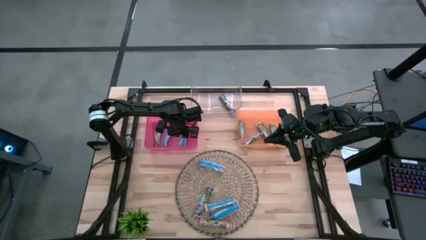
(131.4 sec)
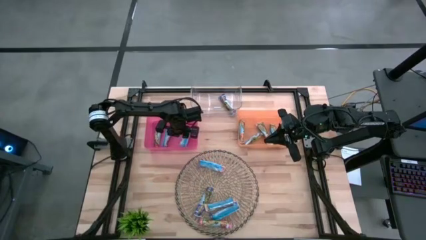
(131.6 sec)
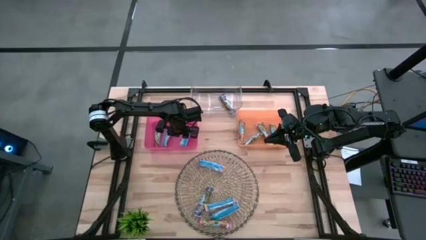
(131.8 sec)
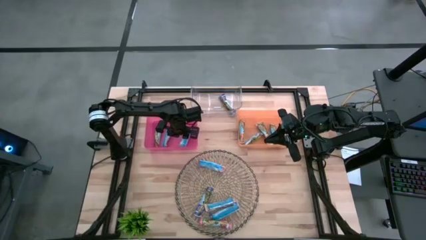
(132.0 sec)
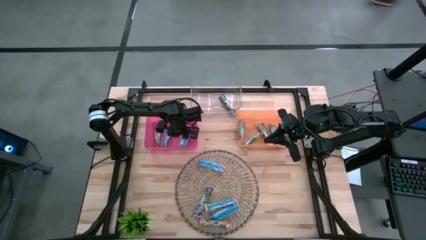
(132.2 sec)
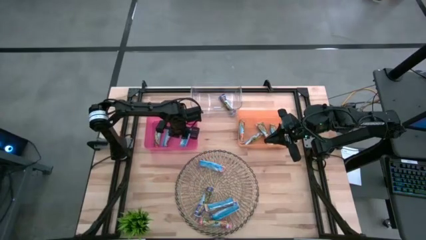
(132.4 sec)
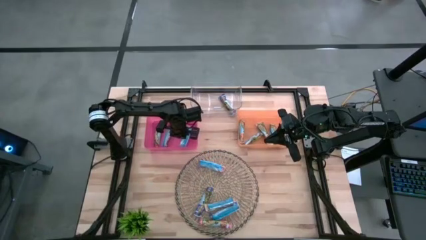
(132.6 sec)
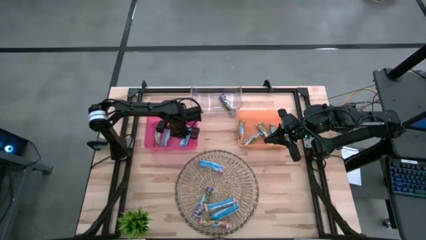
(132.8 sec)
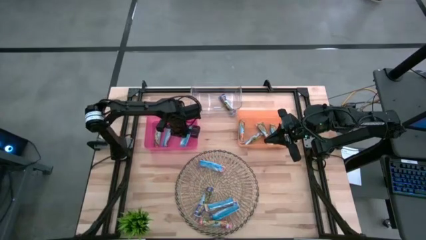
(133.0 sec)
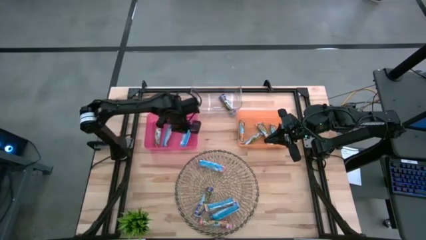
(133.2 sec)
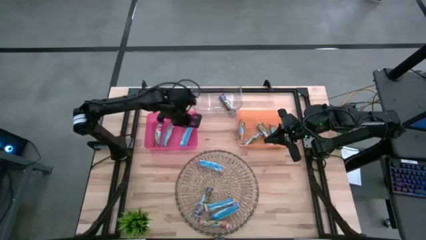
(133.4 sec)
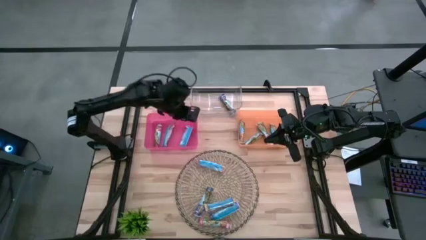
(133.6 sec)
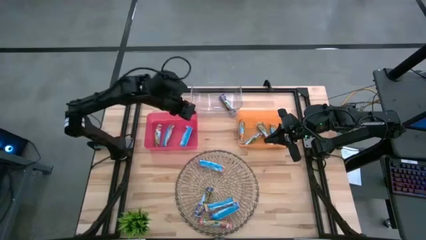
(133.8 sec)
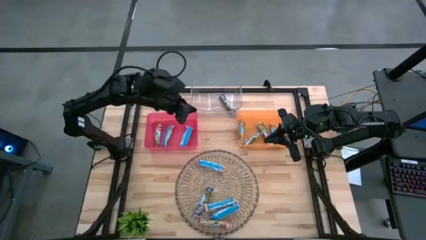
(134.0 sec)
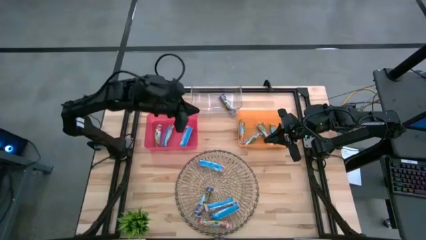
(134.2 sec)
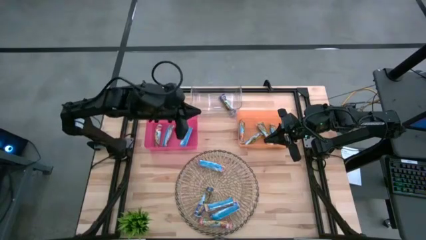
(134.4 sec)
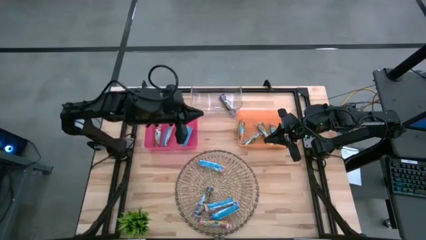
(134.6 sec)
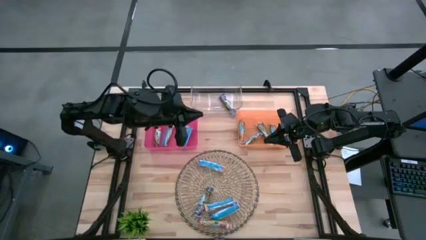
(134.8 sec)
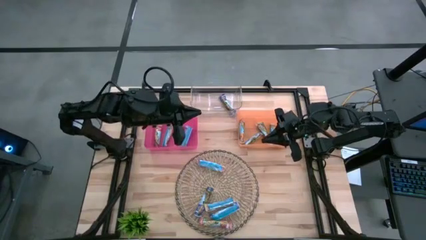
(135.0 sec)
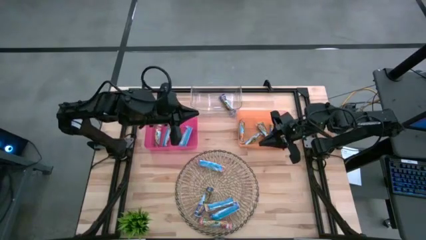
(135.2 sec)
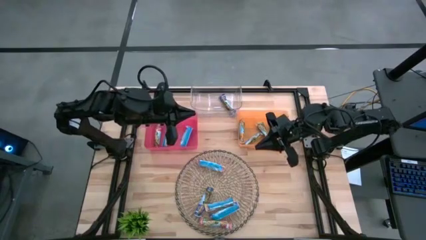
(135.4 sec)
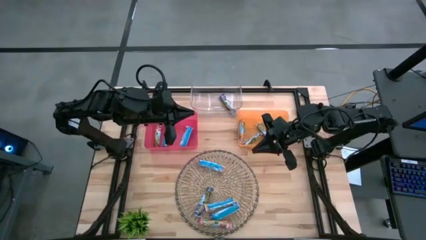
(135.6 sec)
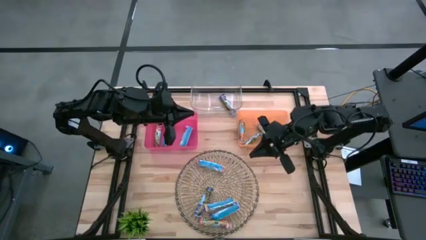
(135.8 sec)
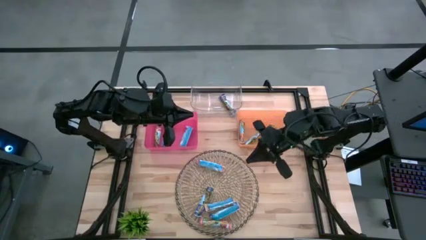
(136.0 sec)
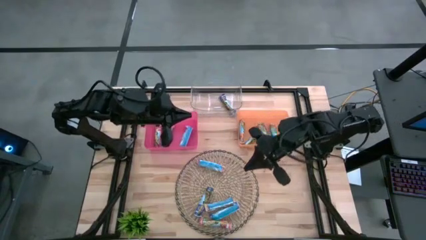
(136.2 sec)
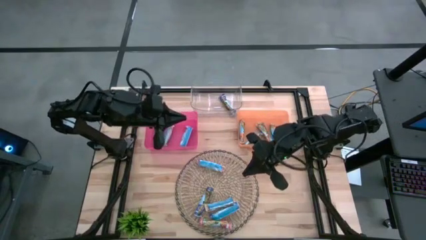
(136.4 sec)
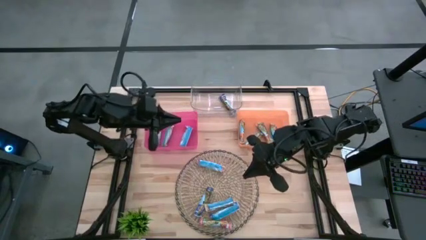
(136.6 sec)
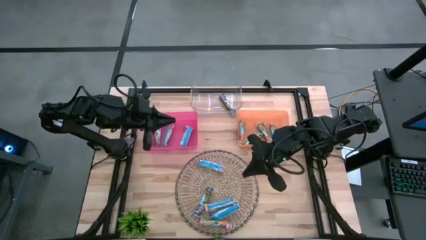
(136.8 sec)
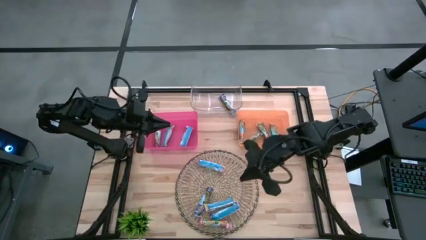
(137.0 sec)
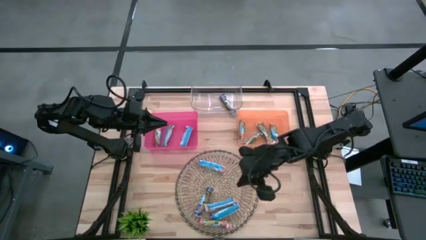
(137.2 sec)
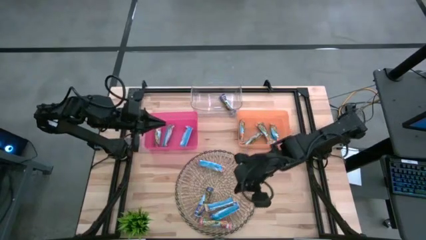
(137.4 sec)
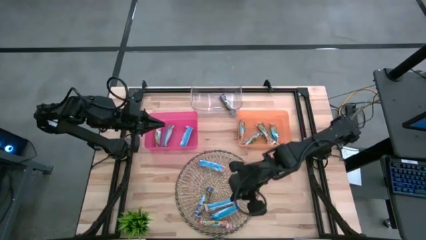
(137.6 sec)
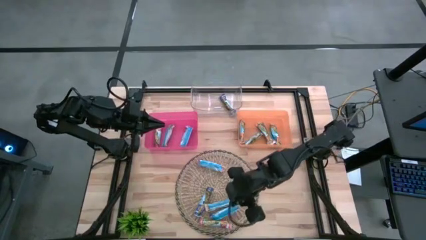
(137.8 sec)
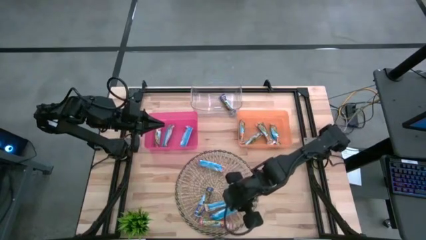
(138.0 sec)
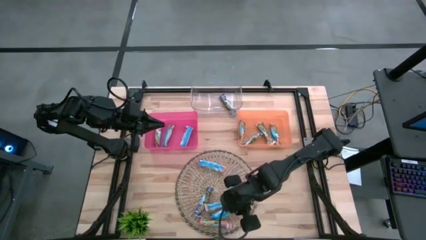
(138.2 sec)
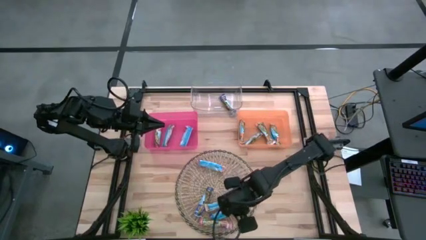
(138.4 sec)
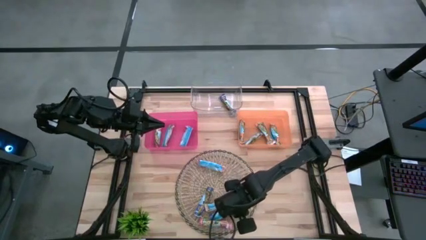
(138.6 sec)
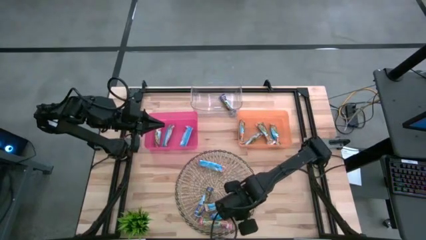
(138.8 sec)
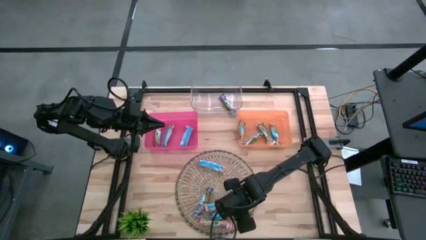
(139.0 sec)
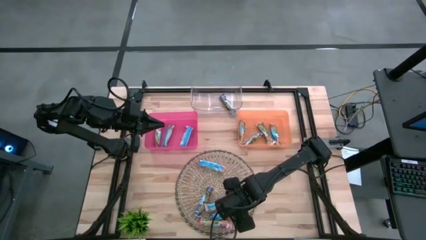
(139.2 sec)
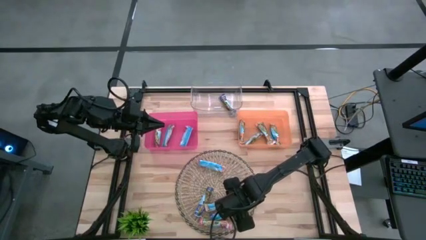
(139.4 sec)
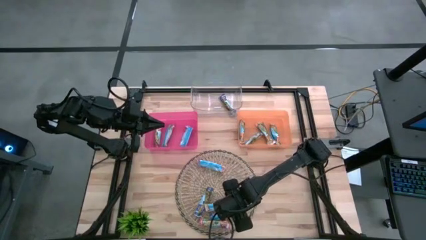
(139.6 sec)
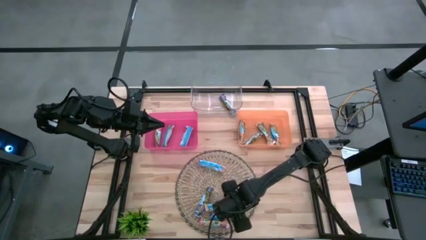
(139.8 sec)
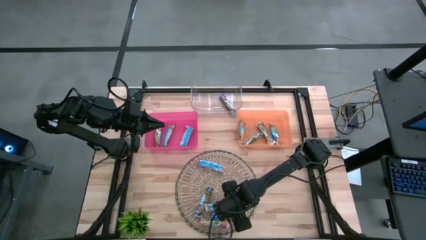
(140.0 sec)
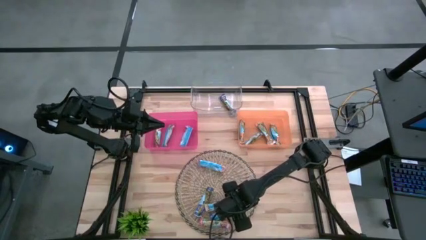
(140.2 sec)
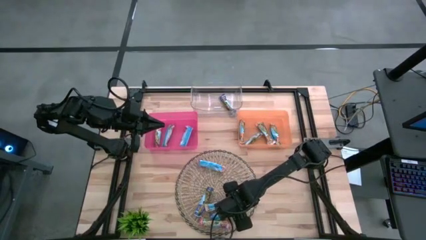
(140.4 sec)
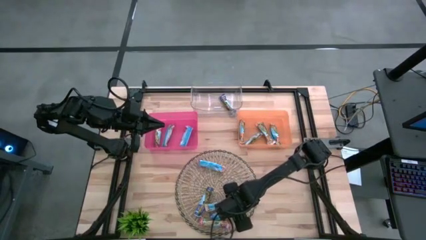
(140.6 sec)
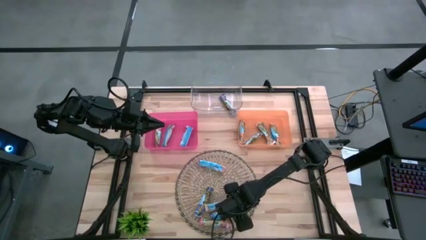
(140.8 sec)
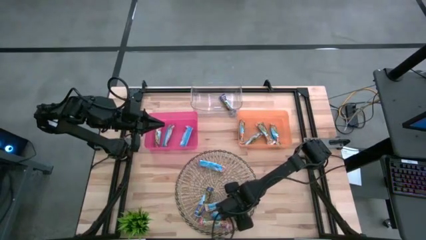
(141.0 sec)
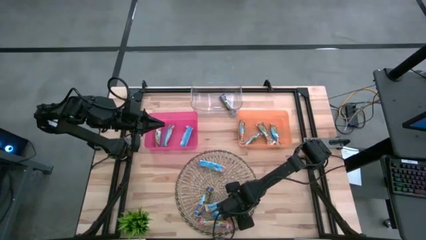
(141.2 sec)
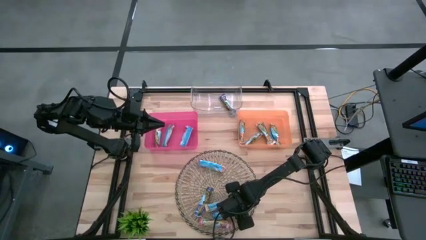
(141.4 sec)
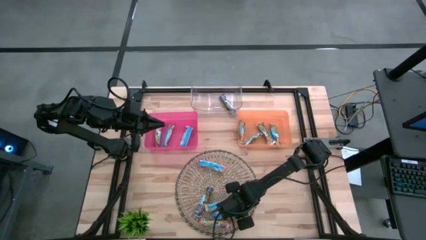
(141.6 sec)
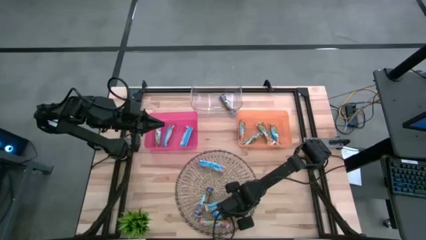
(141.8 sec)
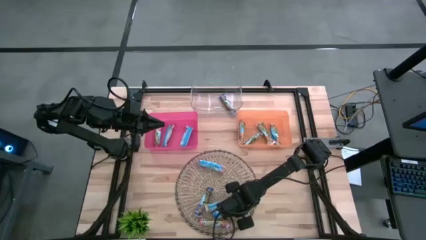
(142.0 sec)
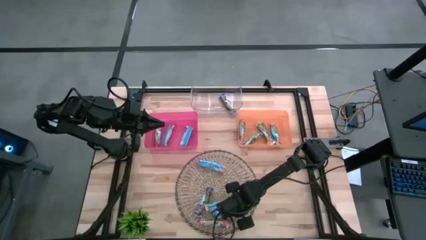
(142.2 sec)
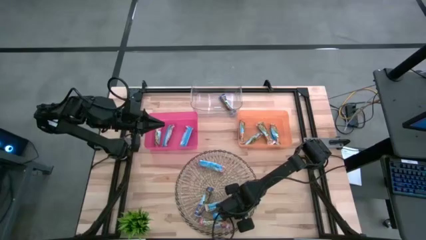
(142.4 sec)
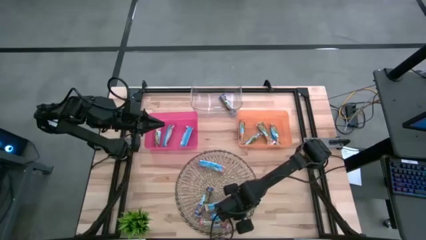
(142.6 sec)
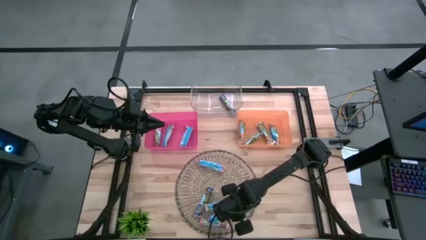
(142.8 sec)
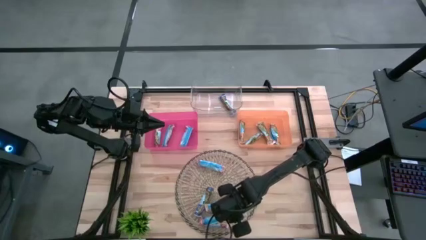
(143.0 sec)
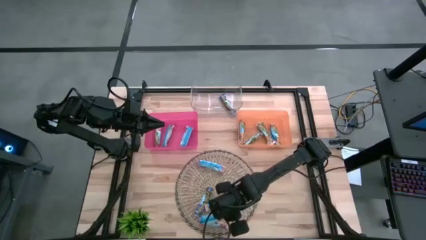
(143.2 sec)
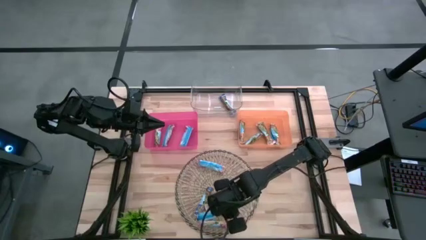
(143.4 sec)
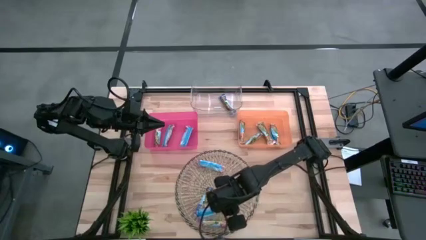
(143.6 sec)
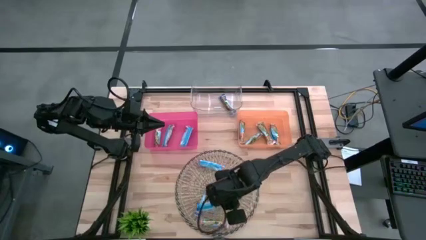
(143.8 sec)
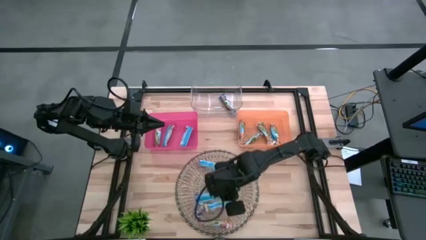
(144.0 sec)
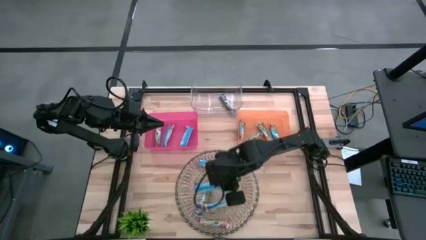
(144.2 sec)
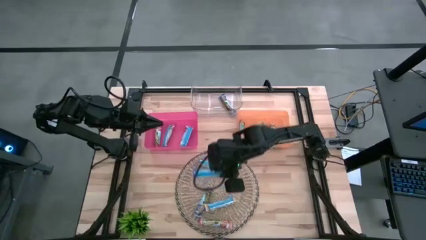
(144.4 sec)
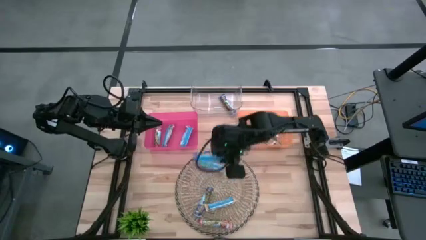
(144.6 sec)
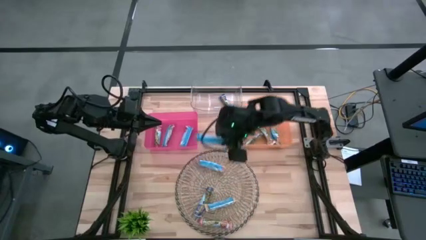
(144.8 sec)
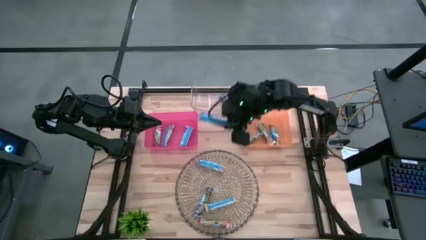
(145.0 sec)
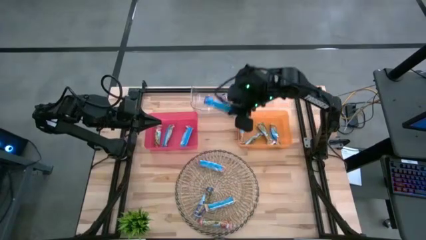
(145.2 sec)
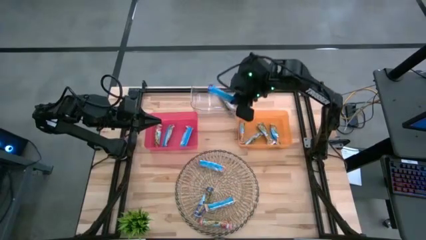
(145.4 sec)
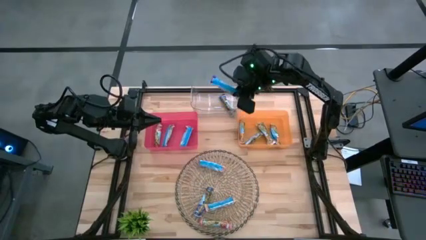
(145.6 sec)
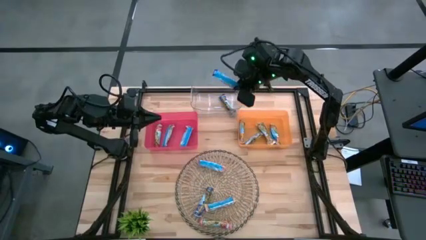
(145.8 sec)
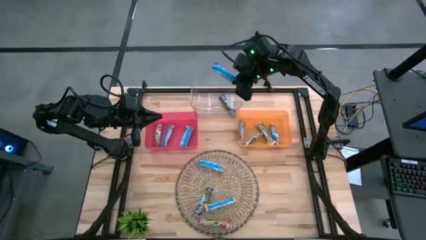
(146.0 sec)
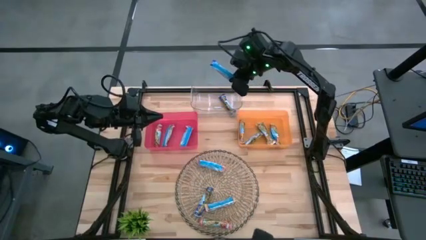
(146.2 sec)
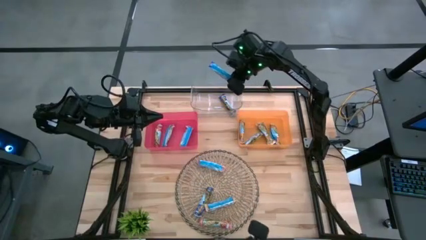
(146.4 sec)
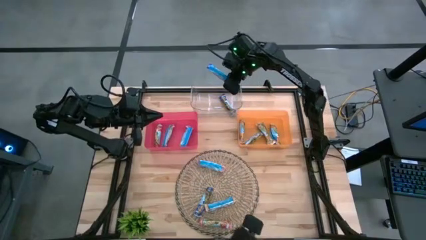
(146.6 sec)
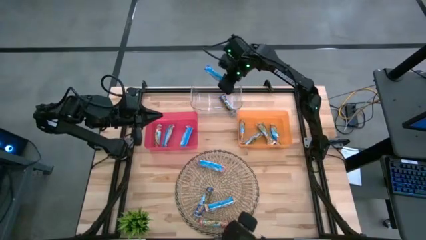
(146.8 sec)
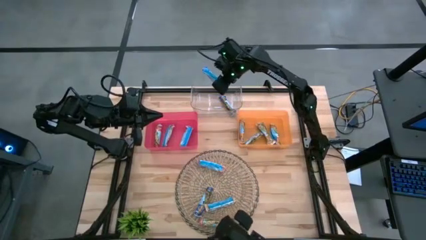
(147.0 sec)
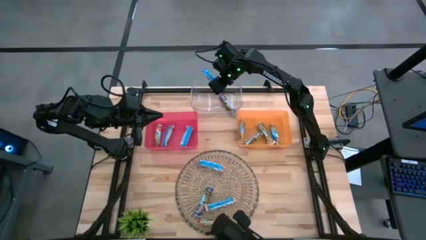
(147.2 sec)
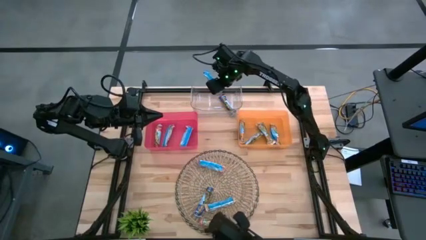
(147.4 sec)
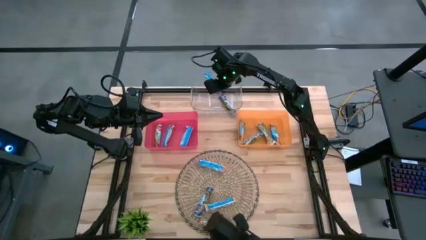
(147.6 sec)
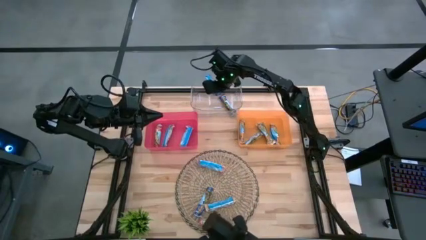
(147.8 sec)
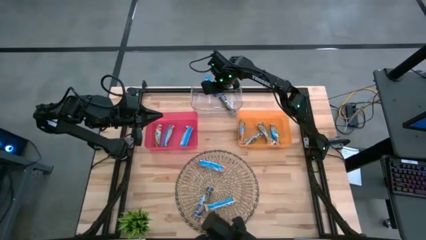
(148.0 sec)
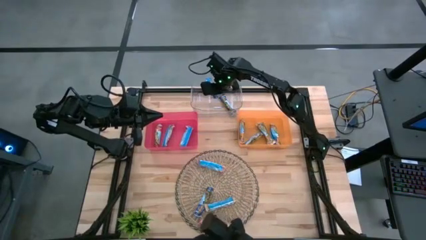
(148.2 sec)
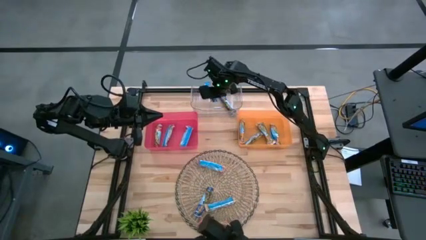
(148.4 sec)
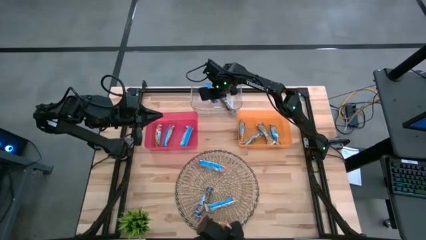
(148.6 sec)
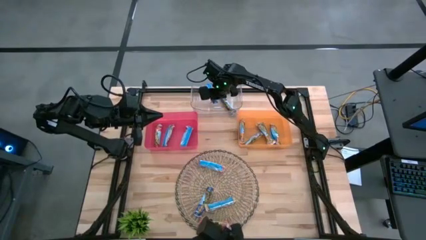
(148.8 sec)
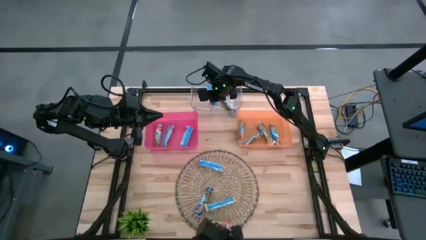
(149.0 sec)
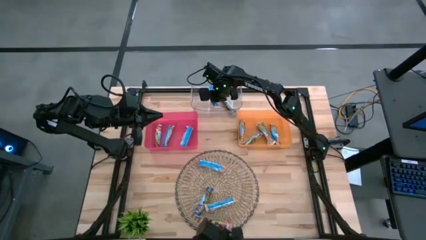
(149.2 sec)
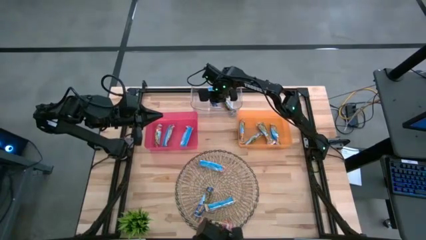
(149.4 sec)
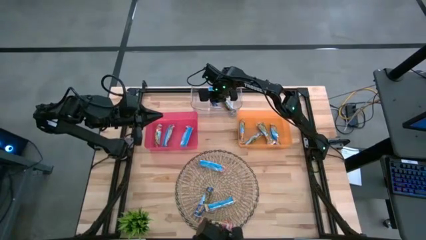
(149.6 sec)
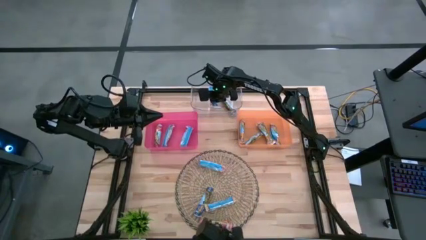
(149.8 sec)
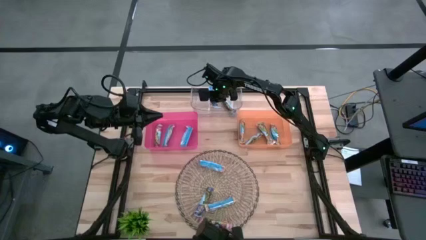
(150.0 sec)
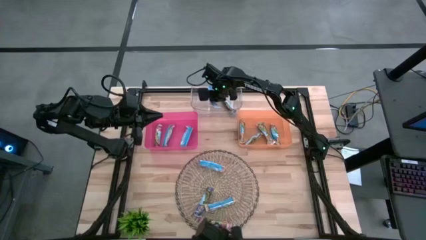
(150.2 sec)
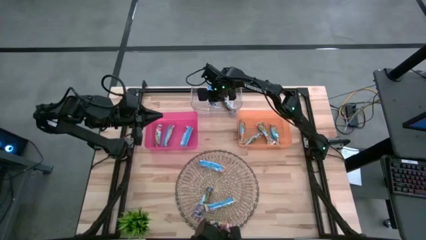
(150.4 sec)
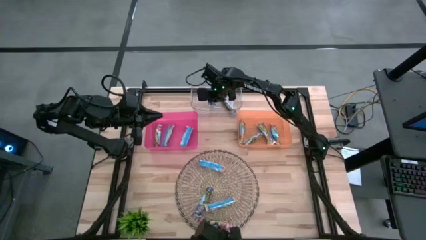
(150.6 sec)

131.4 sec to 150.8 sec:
Task: Pick and place Granola Bars by type
Put the blue granola bar into the transparent bin
